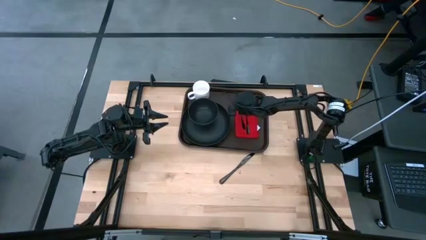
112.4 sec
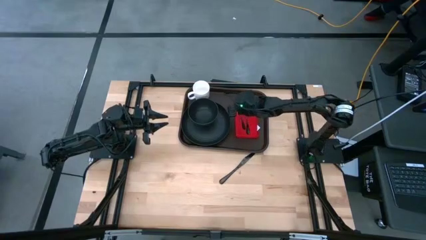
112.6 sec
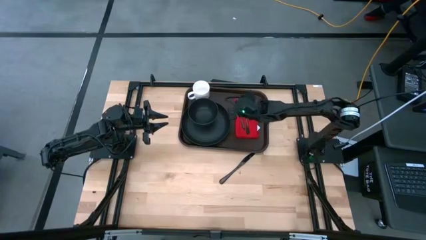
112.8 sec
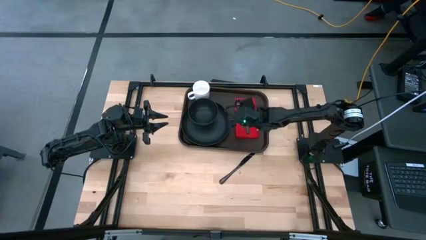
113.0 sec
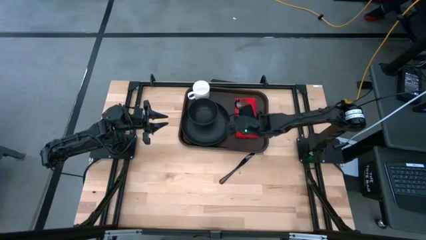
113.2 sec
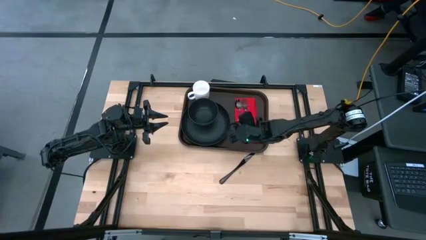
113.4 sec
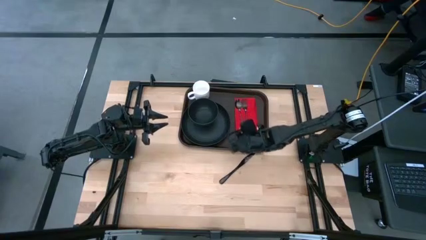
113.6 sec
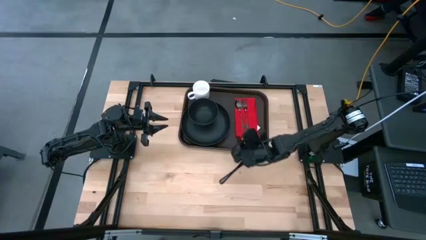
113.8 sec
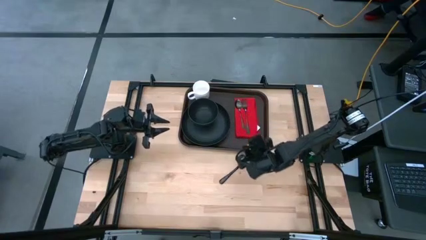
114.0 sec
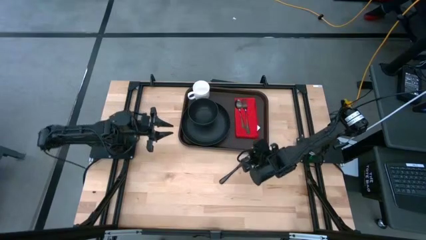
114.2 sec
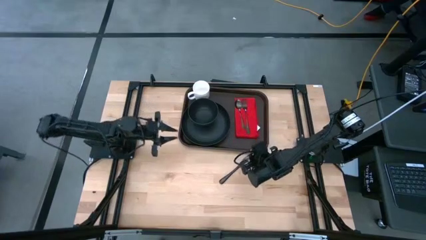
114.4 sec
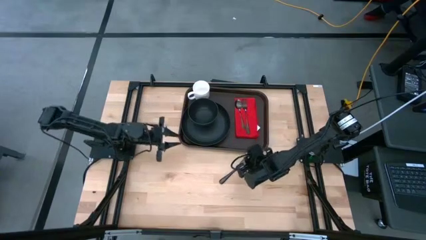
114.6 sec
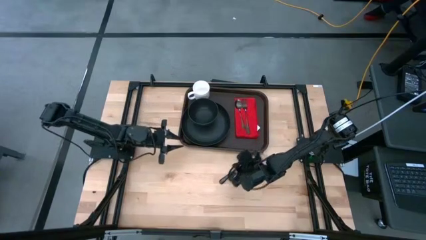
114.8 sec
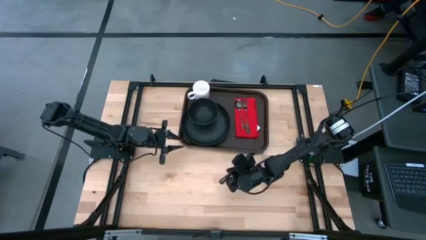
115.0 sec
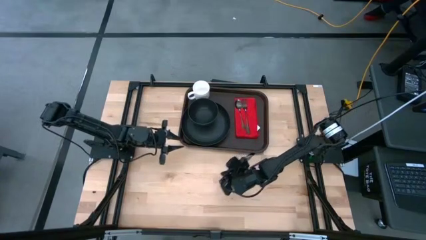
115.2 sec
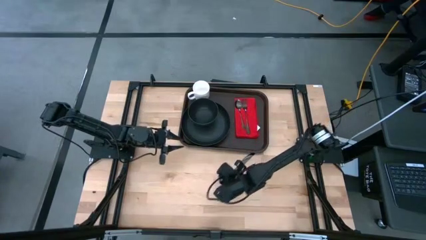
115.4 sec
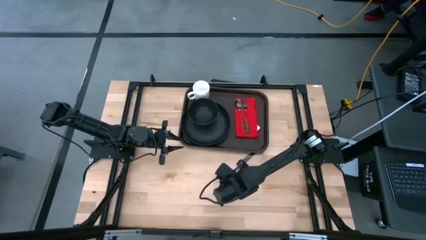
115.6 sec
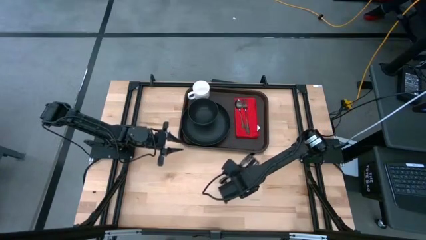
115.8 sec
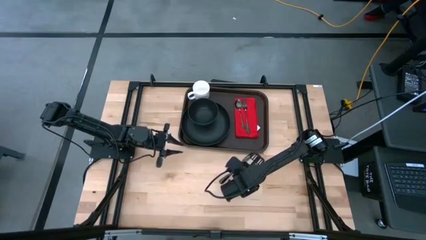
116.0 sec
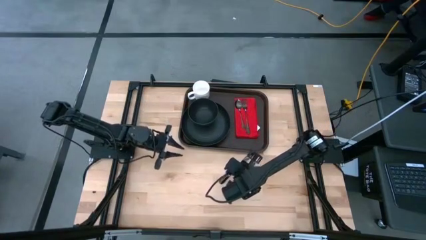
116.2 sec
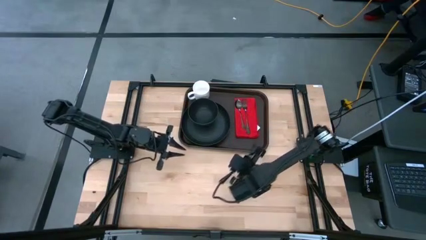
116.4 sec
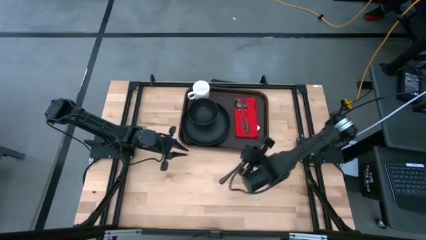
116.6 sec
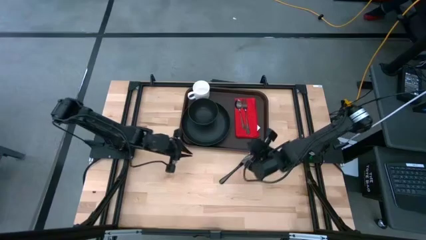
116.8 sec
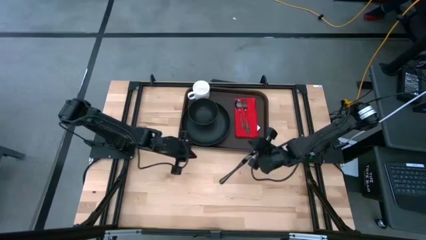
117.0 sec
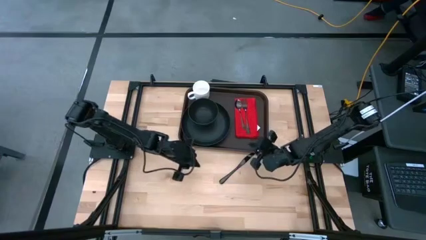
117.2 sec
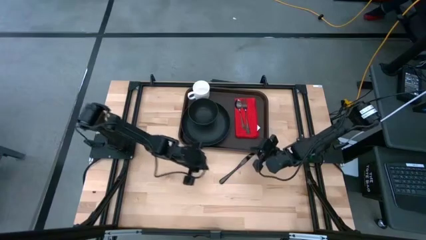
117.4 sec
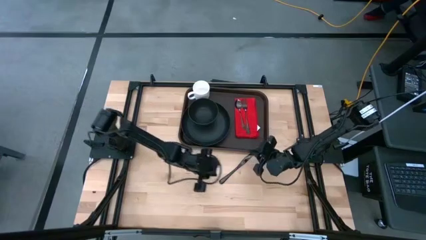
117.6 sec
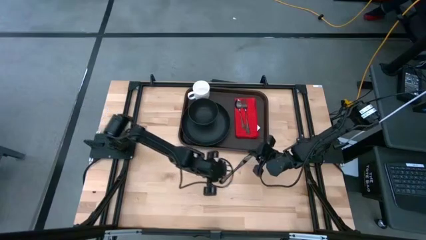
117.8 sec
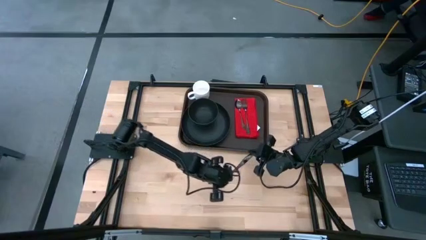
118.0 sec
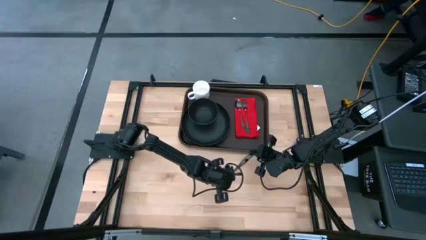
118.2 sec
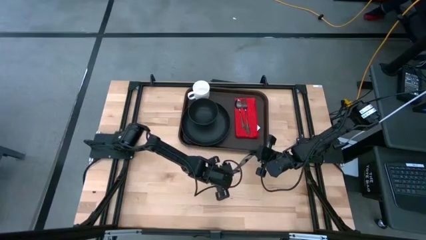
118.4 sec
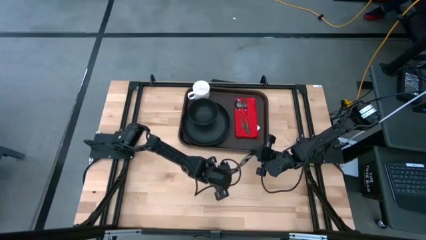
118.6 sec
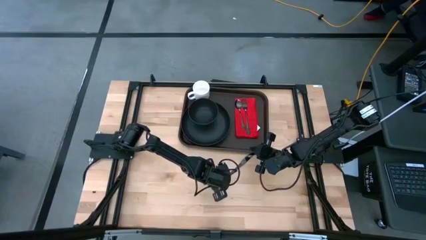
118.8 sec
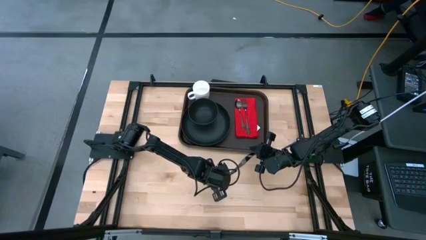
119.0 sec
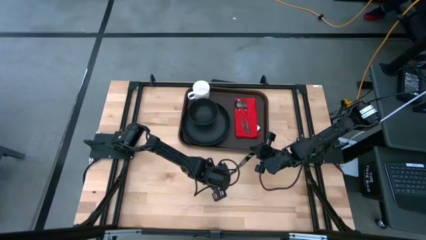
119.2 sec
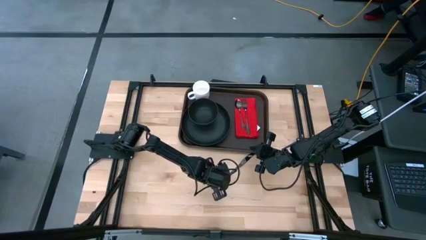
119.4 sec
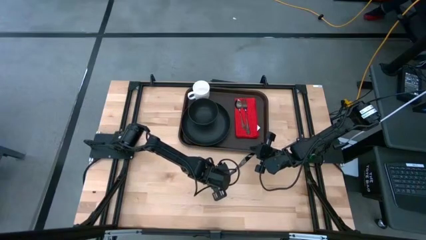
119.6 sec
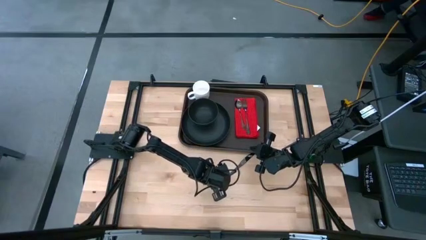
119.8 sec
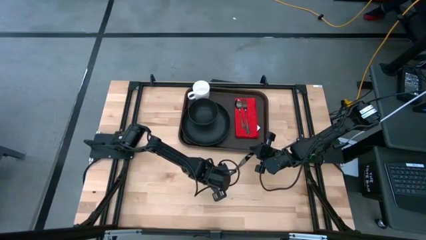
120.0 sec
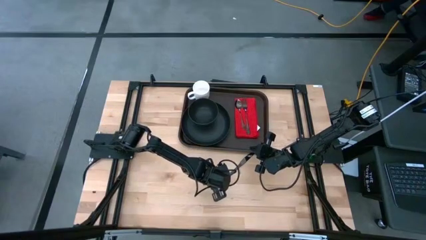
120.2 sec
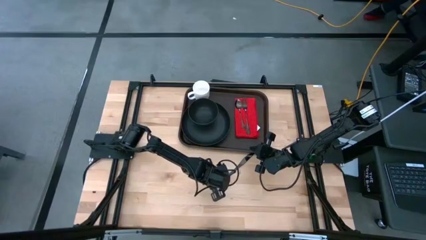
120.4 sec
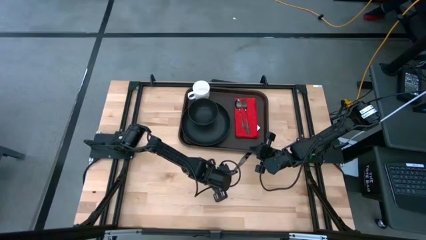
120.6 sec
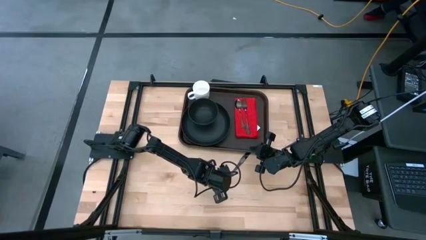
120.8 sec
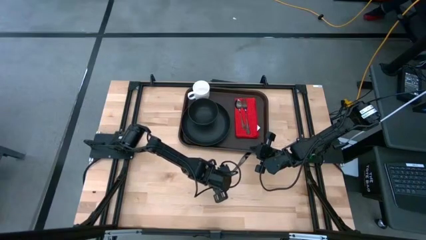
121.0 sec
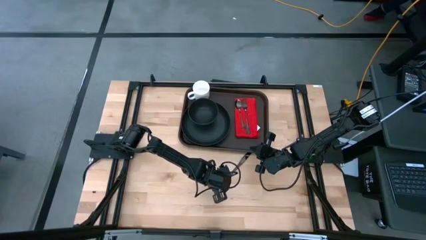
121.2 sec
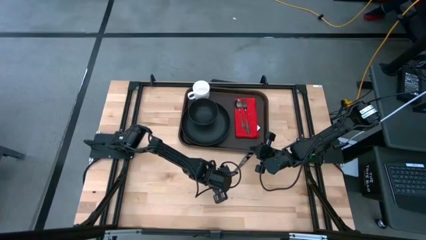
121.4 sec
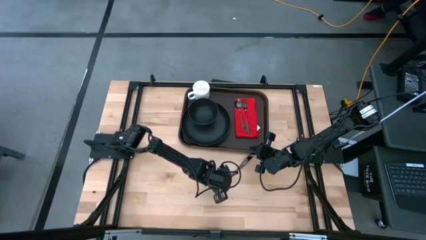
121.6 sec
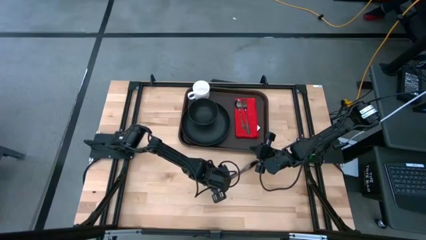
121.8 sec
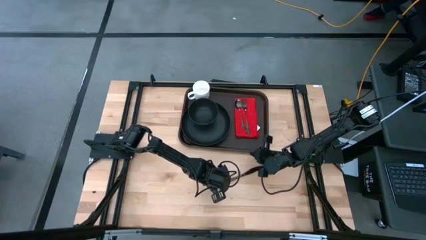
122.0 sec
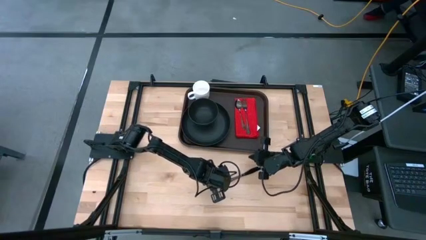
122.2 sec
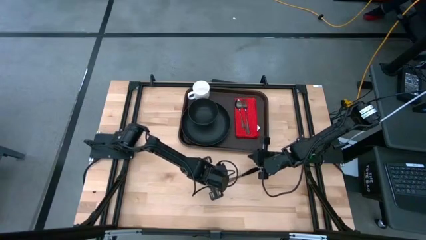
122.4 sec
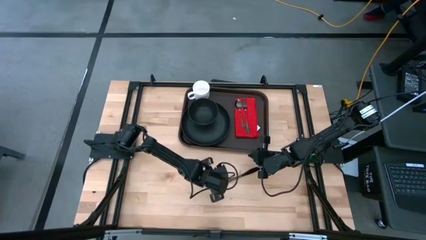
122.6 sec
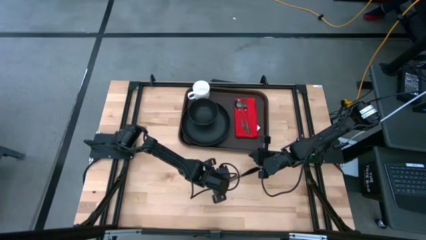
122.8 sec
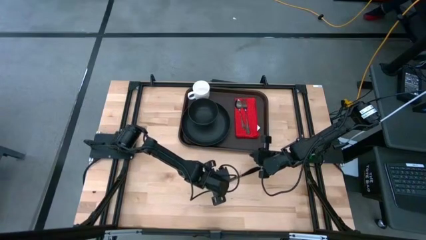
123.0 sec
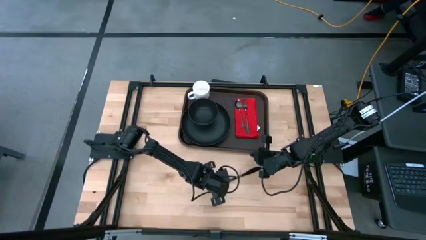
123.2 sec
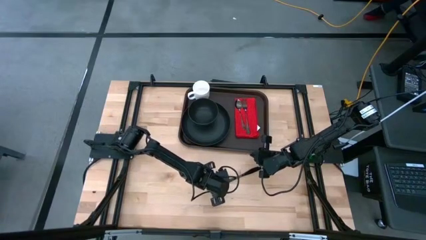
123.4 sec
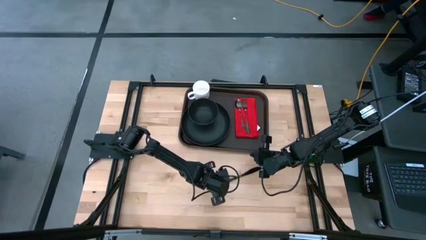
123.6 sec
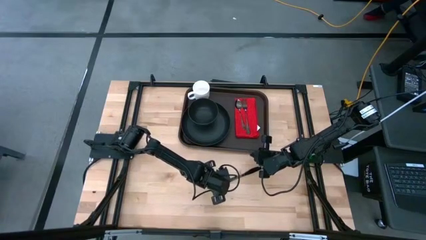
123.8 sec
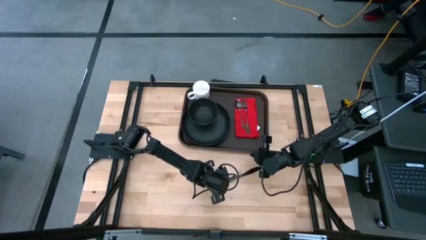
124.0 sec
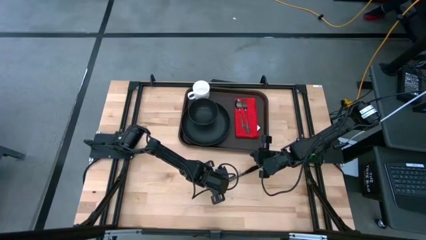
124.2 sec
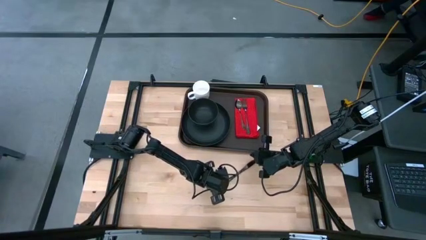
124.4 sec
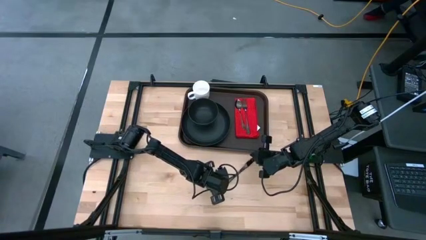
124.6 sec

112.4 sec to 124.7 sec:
Task: Set up tray
Put the black knife on the red napkin to the right of the black fork
